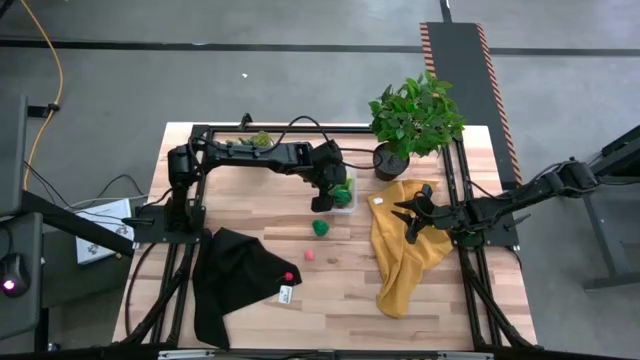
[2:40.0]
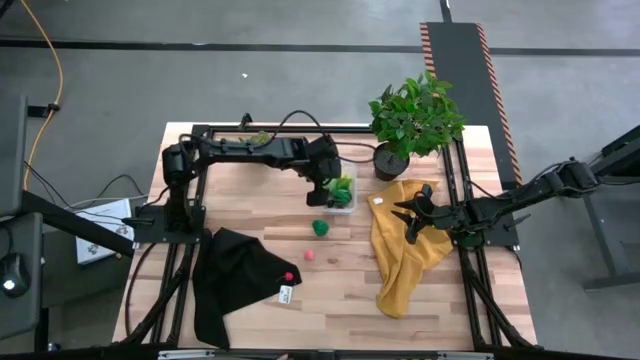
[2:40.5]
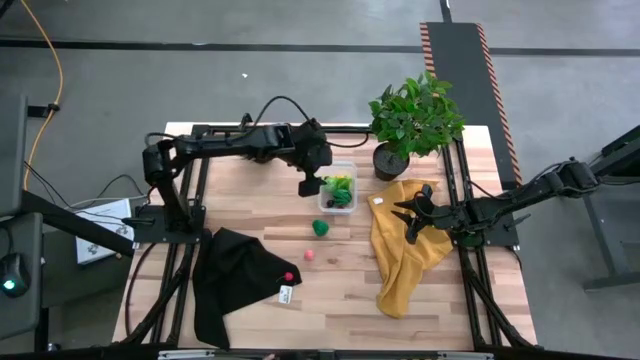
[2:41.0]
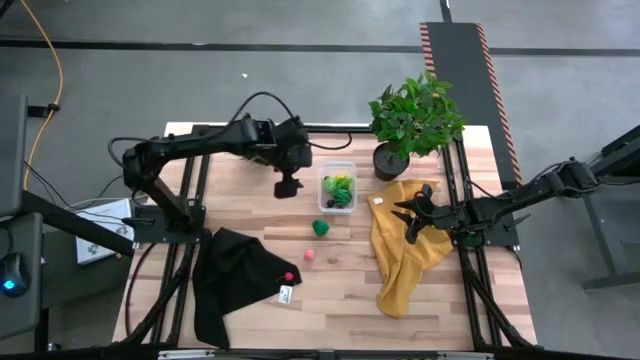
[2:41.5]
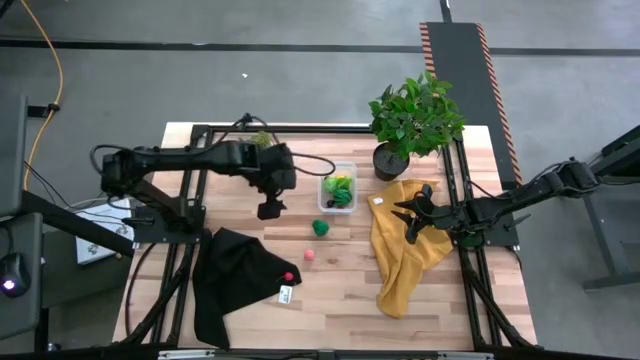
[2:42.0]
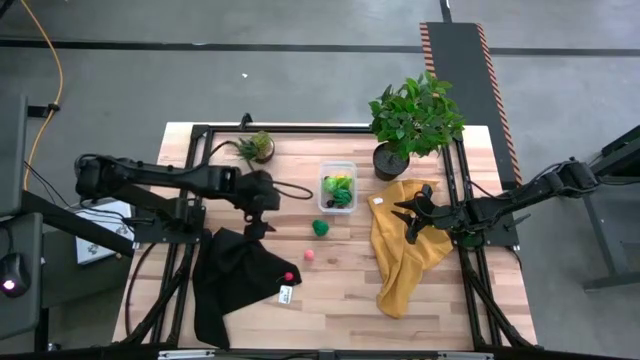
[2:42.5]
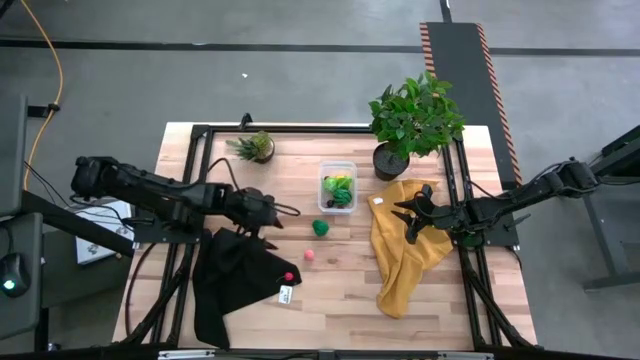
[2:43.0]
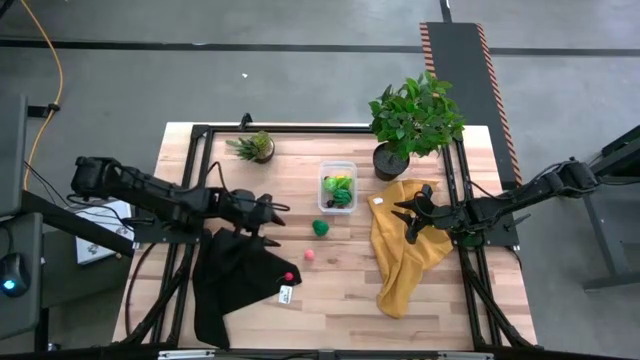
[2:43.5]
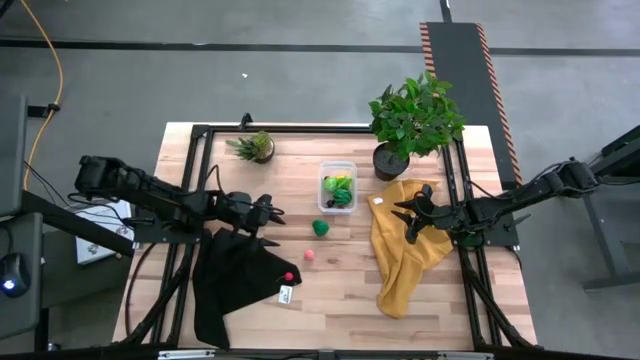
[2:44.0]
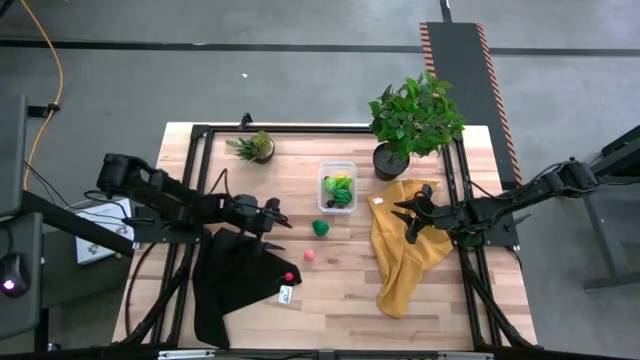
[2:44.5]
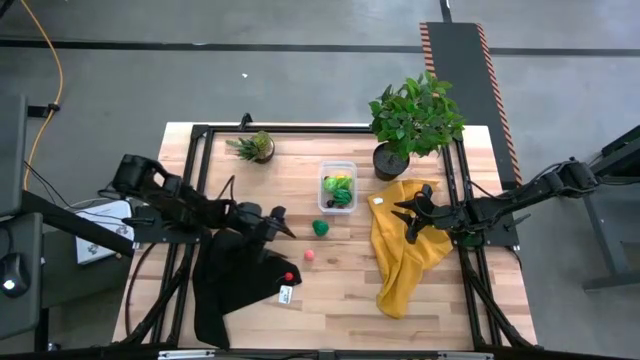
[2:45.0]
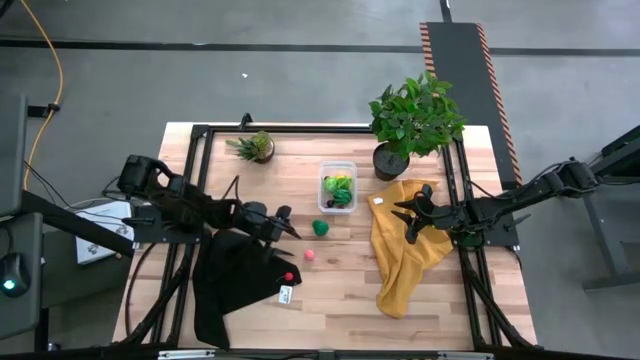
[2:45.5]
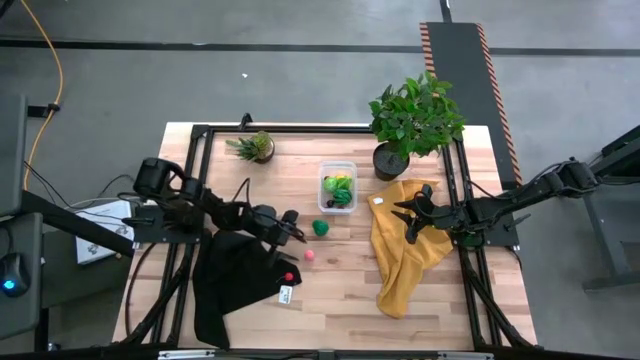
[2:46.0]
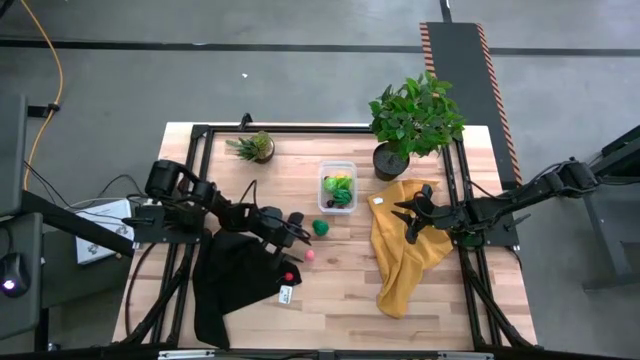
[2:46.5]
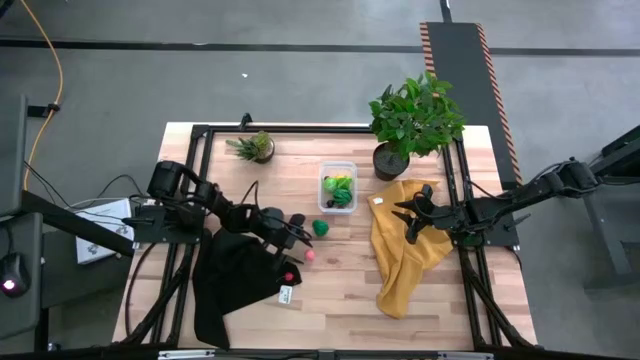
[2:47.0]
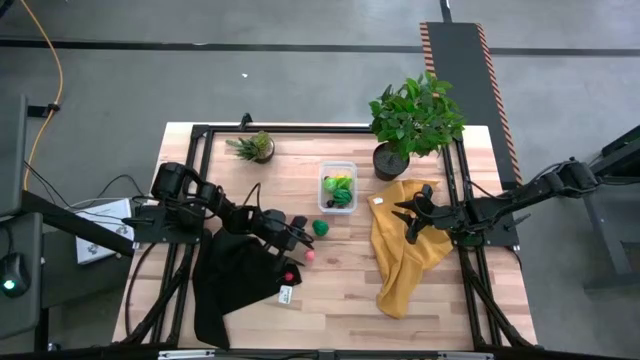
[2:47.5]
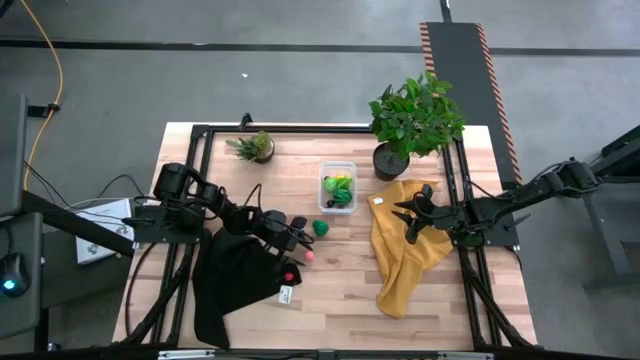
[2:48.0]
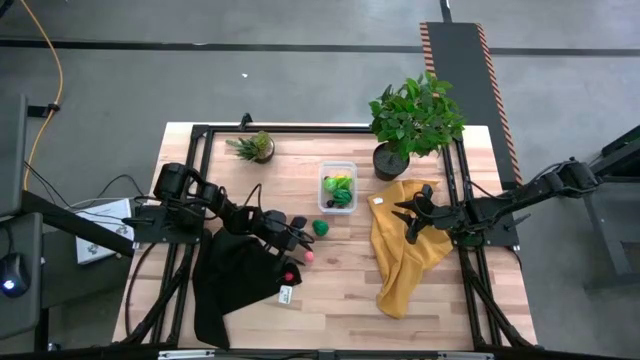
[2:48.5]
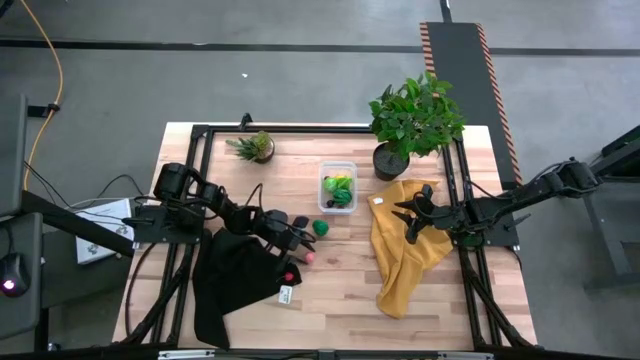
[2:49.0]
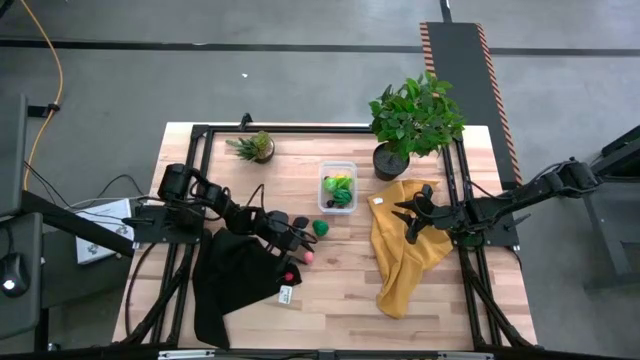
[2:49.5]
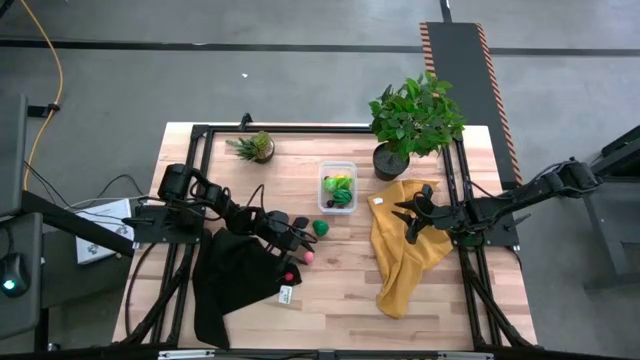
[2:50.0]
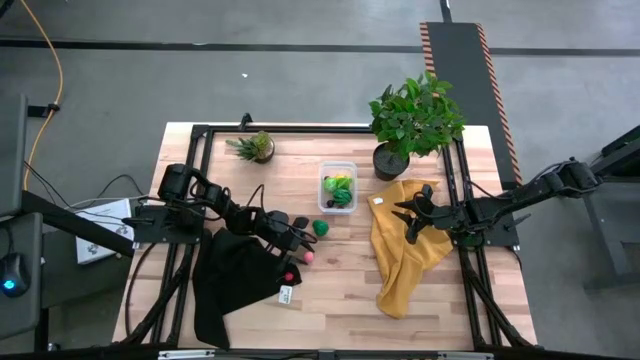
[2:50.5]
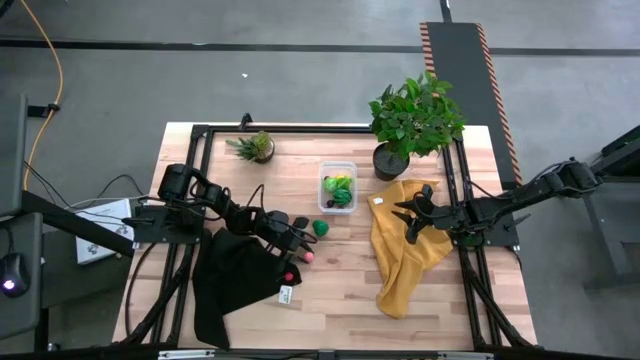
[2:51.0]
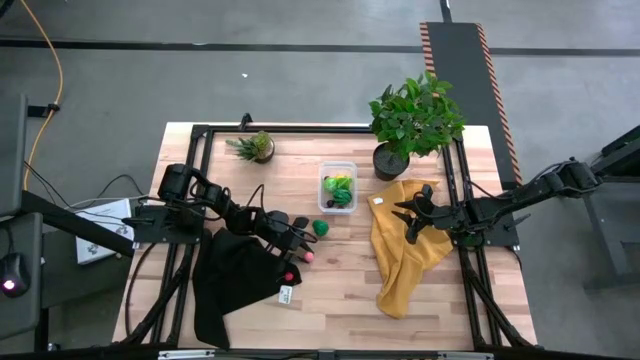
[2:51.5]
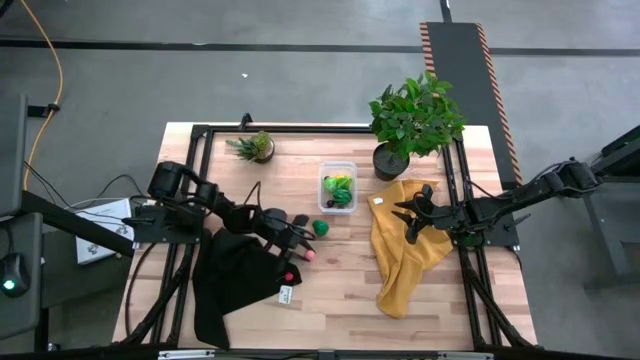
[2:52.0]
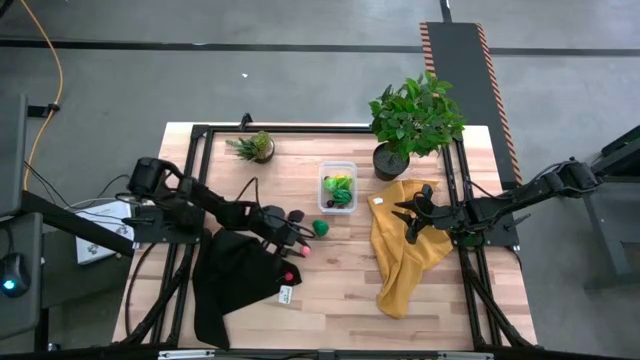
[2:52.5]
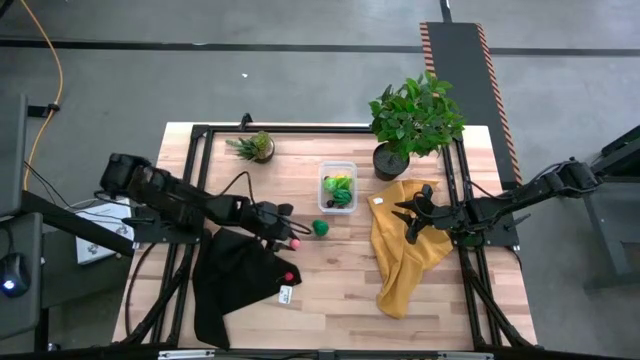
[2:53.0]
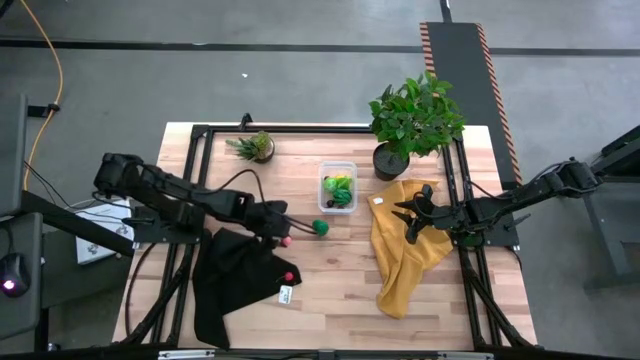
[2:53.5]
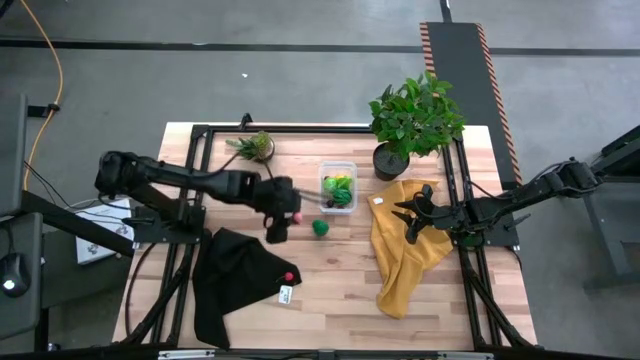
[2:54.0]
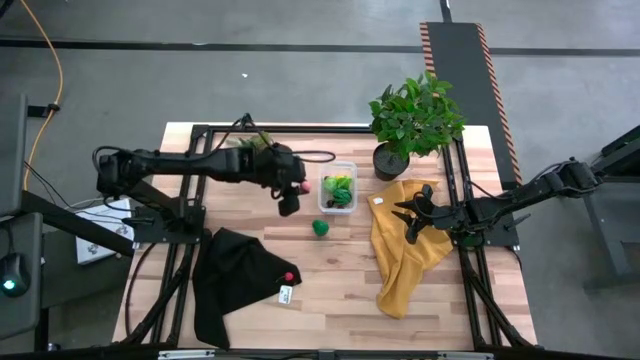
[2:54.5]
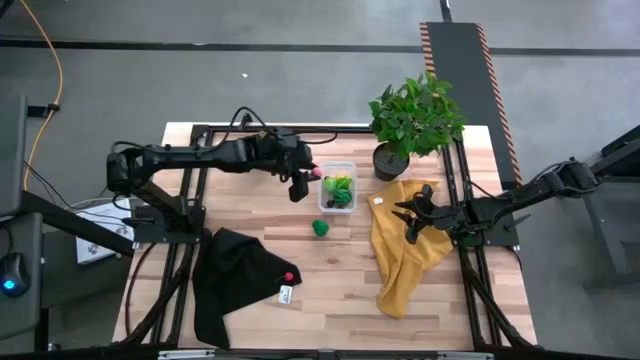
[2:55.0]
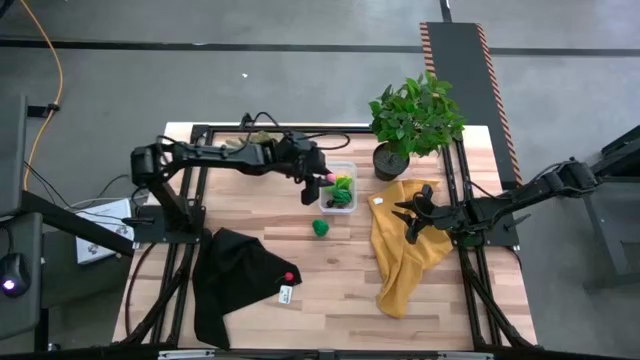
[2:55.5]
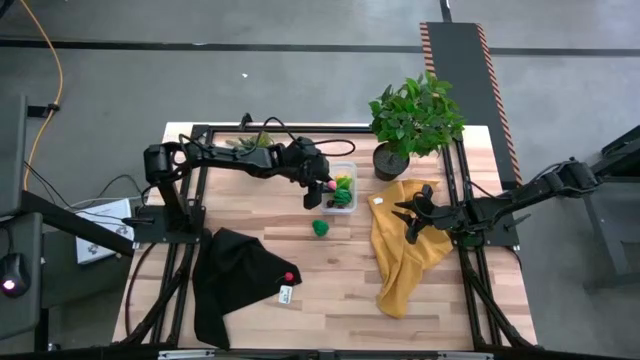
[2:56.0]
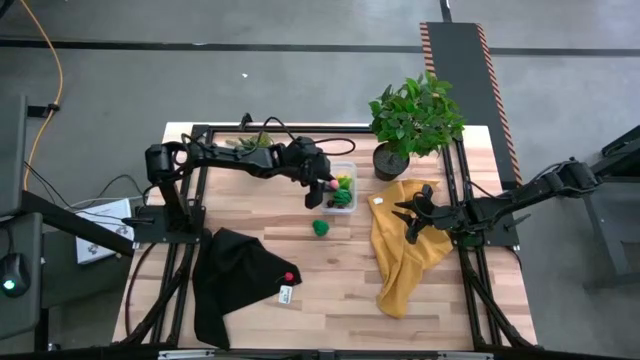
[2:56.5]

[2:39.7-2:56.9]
Task: Pick and placing Produce into tupperware
Put the peach into the transparent bin

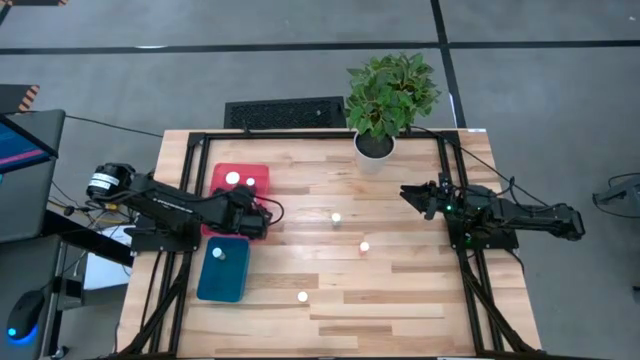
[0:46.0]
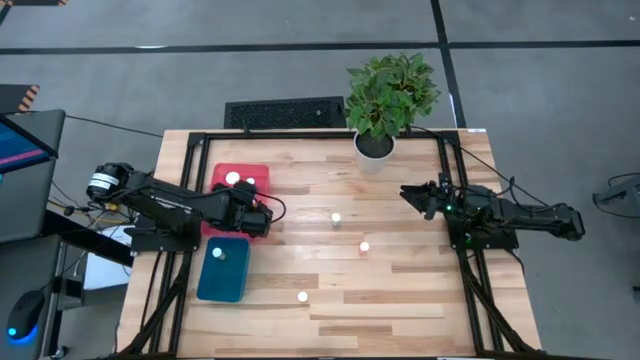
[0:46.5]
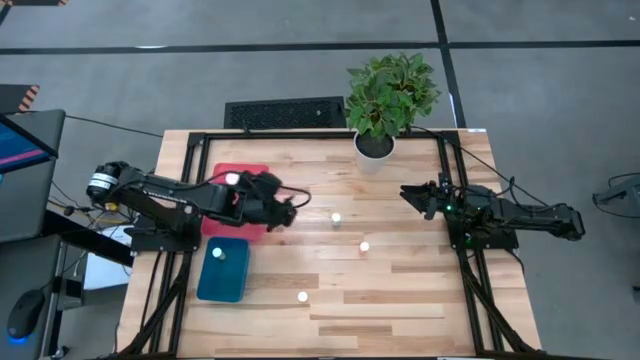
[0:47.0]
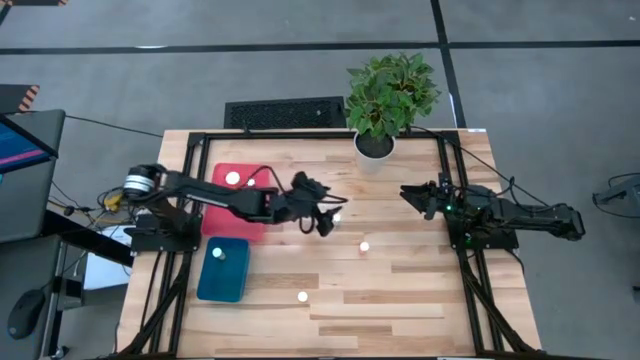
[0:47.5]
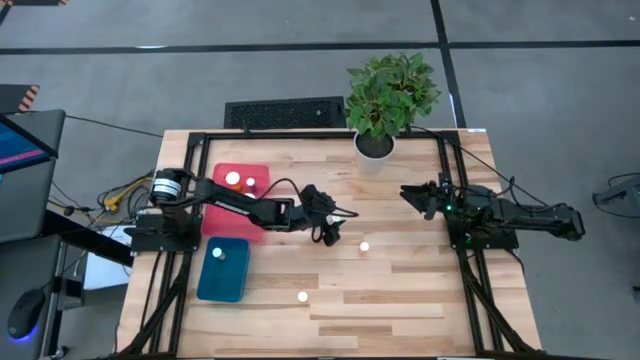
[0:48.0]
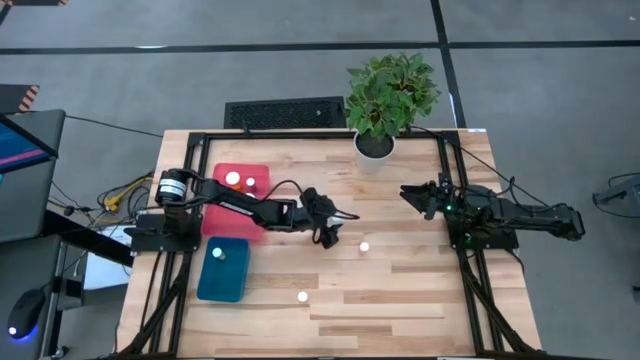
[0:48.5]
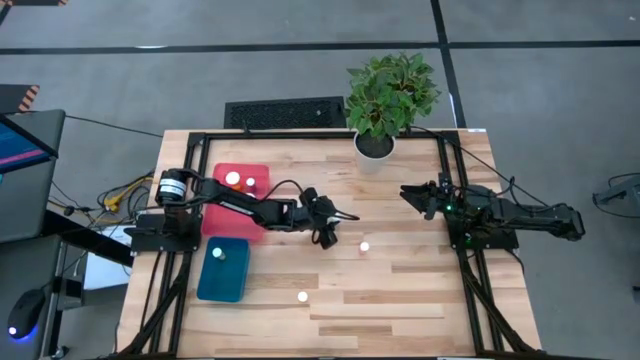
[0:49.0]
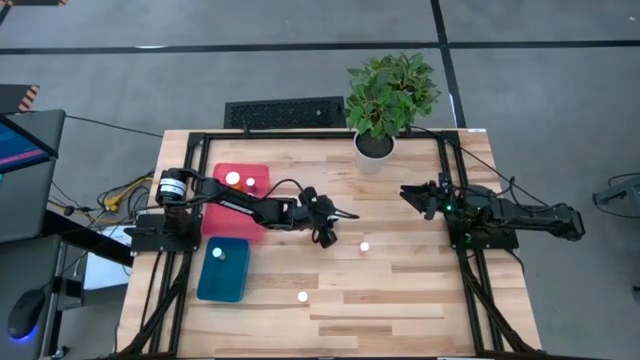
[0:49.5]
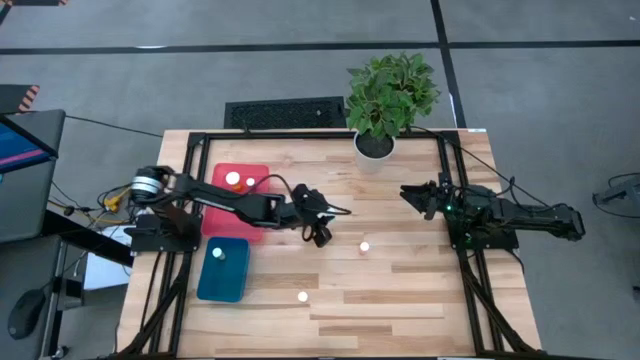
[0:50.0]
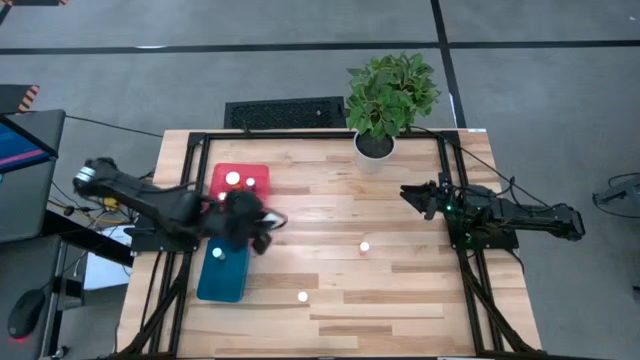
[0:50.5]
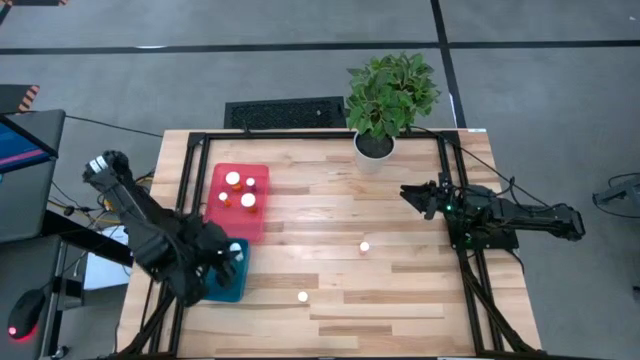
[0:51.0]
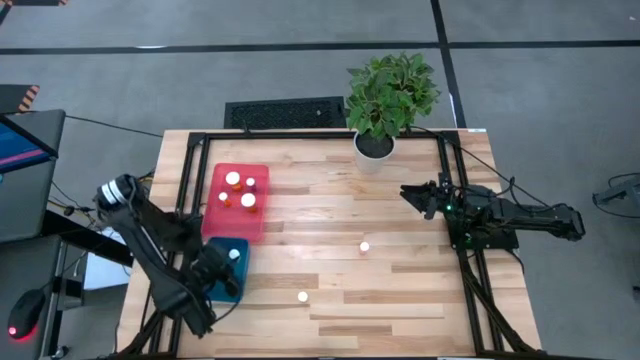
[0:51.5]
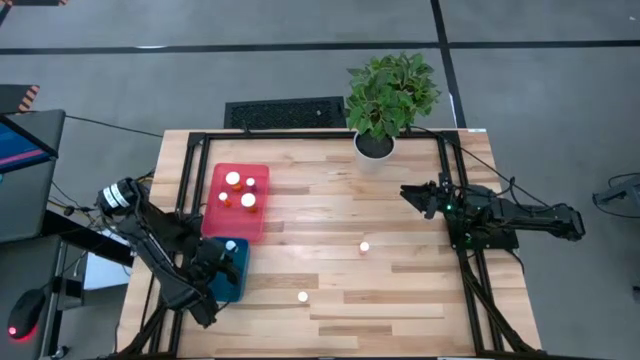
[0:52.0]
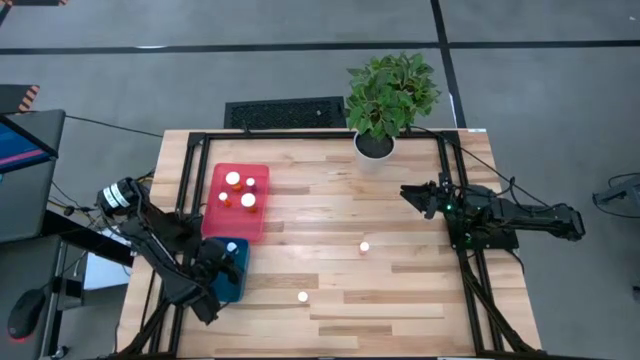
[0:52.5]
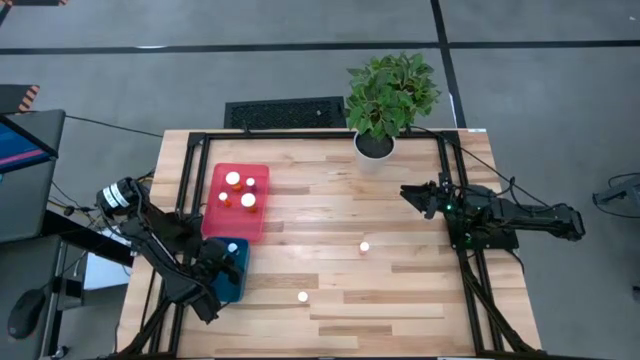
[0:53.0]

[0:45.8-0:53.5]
Task: Pick and place medicine bottles into bin by pill shape (circle, oval)
Put the blue tablet bottle into the blue bin
